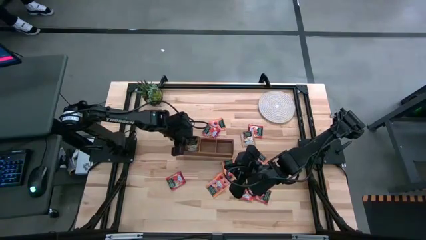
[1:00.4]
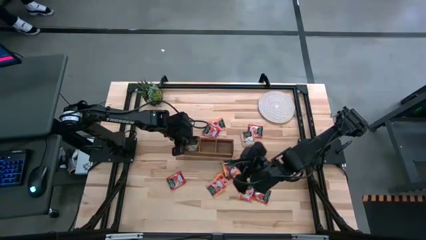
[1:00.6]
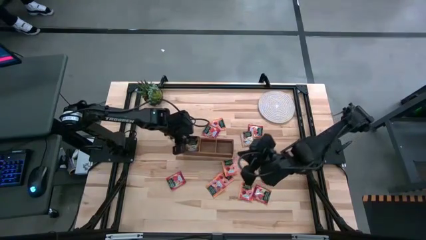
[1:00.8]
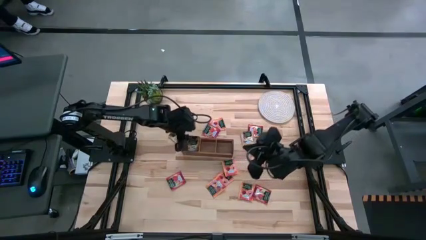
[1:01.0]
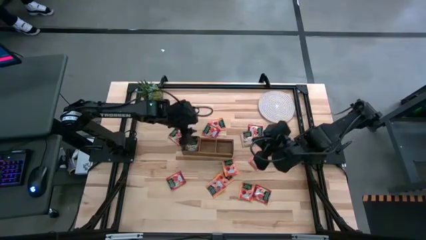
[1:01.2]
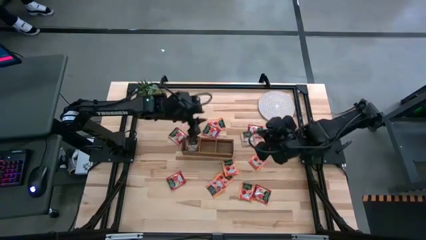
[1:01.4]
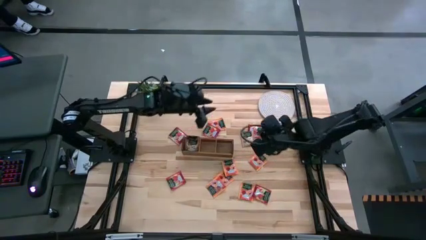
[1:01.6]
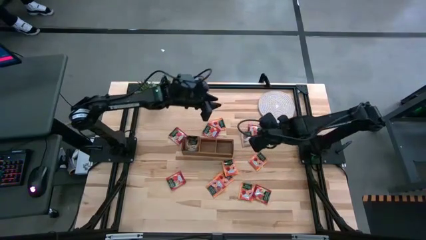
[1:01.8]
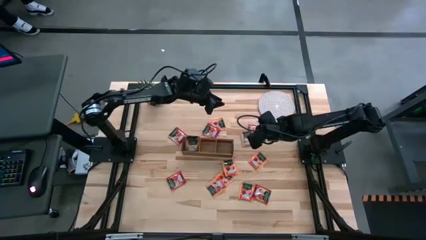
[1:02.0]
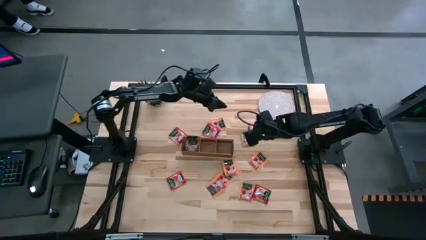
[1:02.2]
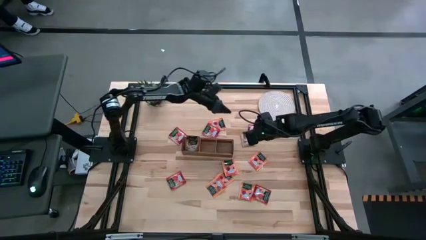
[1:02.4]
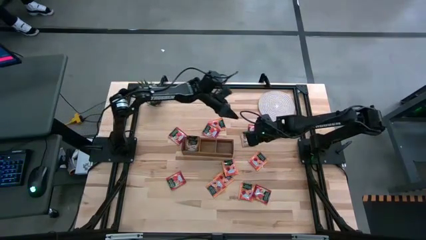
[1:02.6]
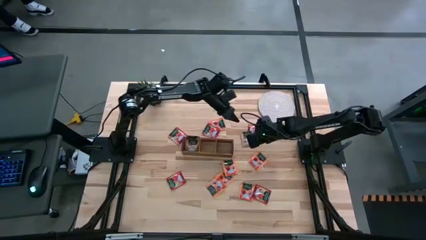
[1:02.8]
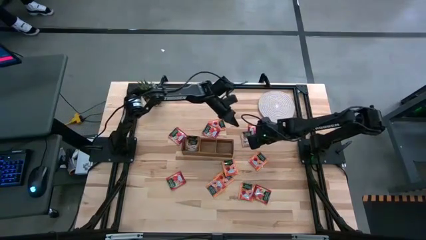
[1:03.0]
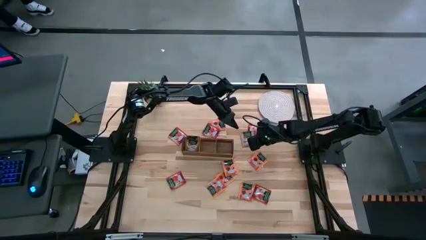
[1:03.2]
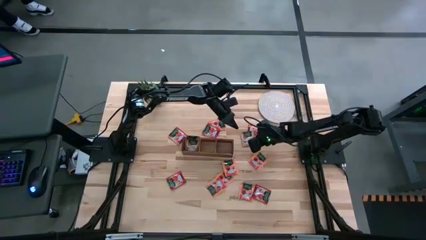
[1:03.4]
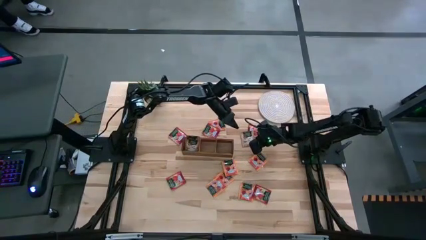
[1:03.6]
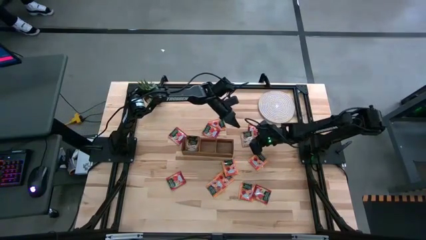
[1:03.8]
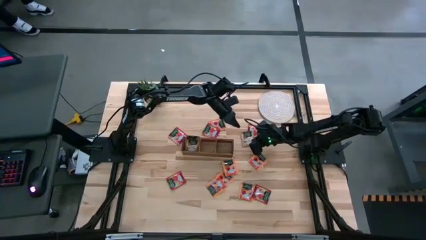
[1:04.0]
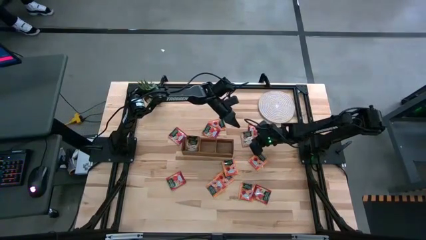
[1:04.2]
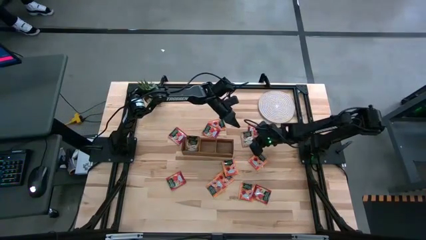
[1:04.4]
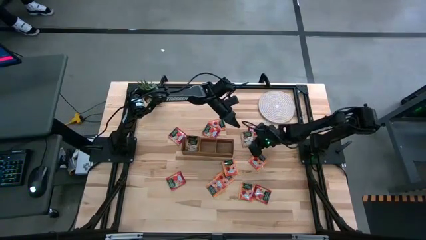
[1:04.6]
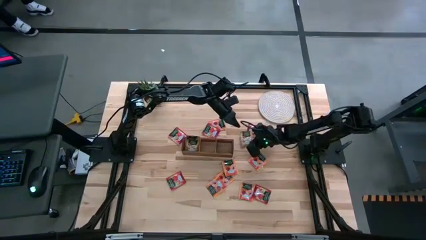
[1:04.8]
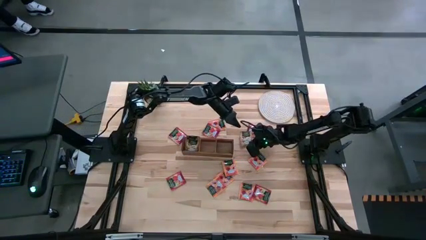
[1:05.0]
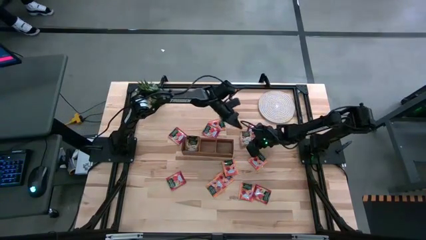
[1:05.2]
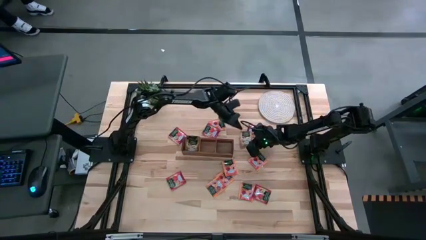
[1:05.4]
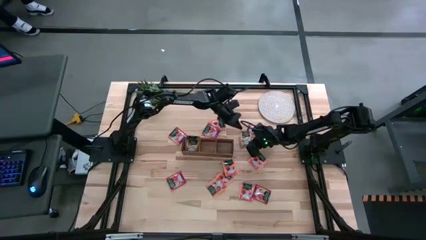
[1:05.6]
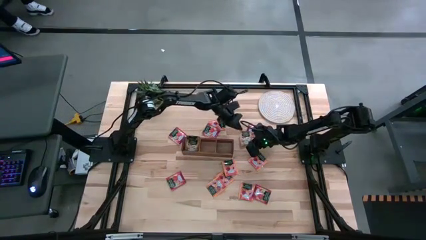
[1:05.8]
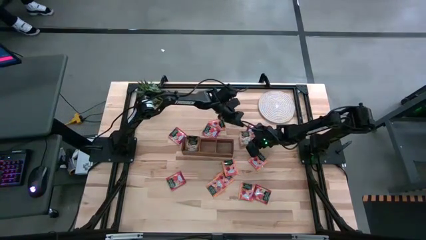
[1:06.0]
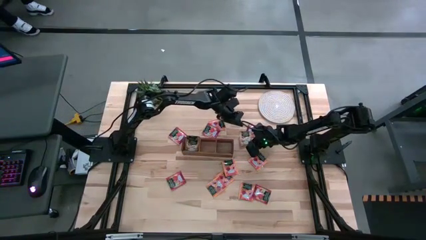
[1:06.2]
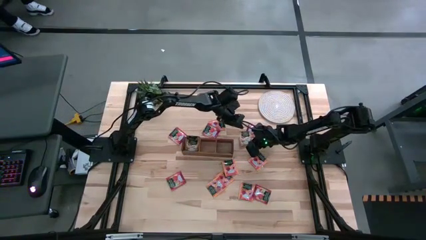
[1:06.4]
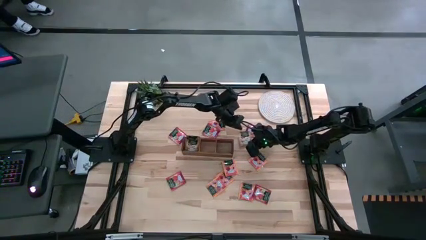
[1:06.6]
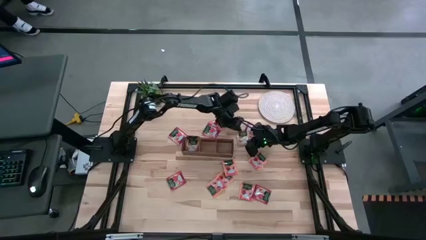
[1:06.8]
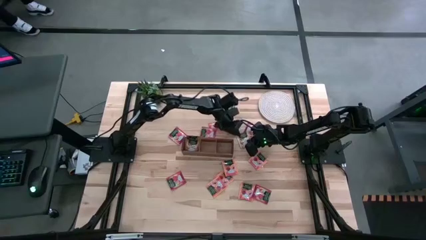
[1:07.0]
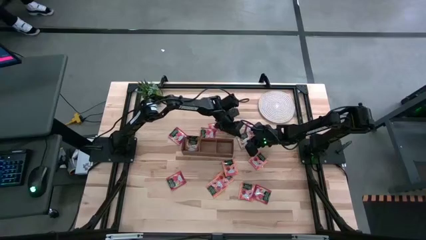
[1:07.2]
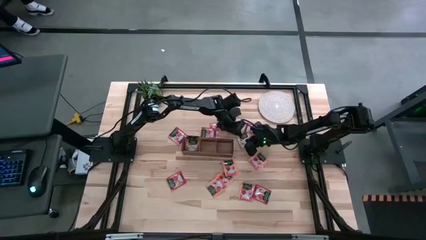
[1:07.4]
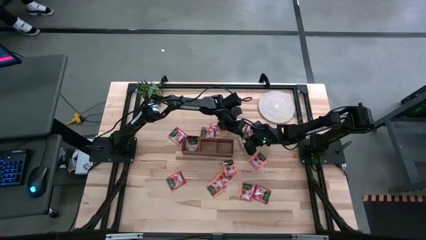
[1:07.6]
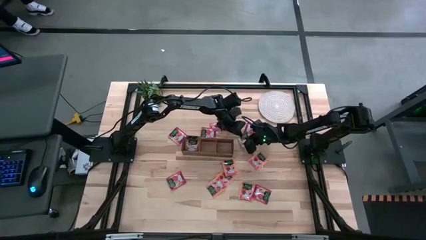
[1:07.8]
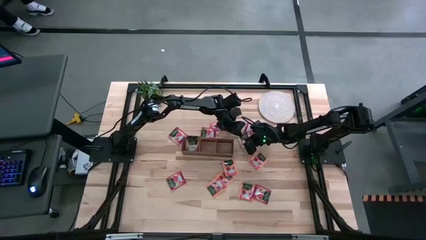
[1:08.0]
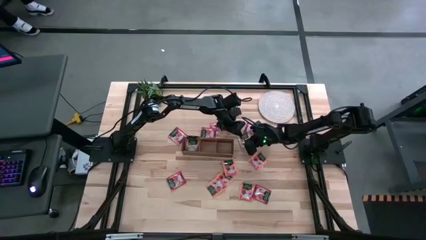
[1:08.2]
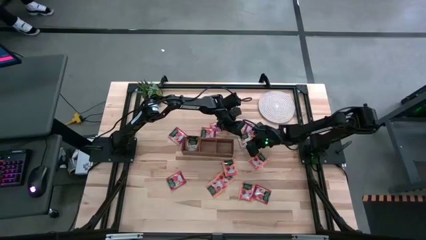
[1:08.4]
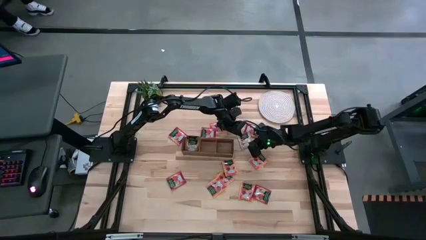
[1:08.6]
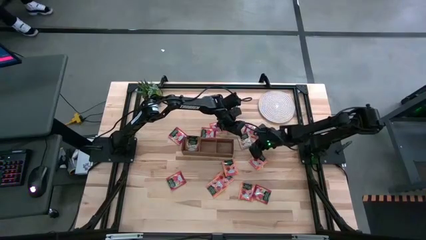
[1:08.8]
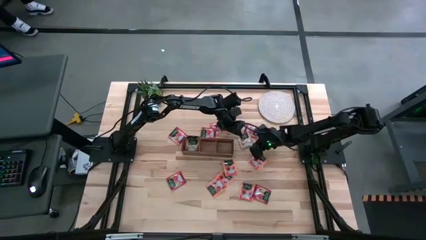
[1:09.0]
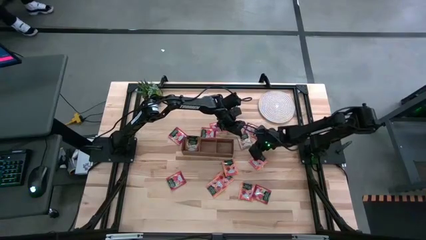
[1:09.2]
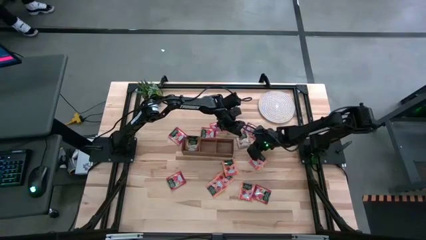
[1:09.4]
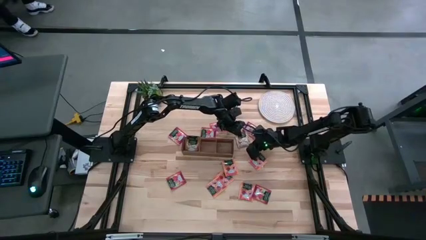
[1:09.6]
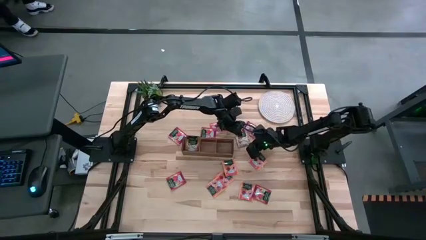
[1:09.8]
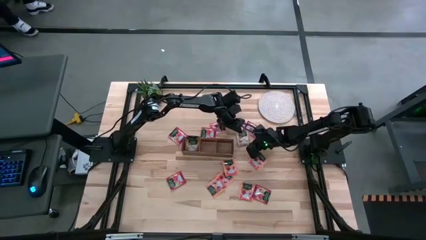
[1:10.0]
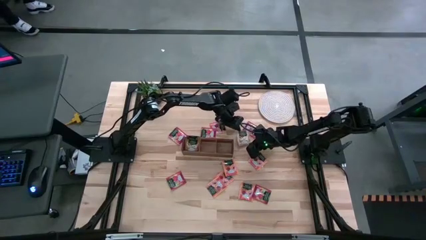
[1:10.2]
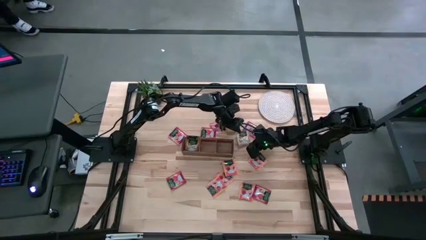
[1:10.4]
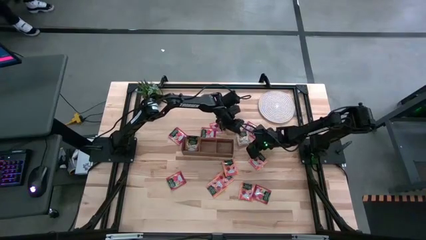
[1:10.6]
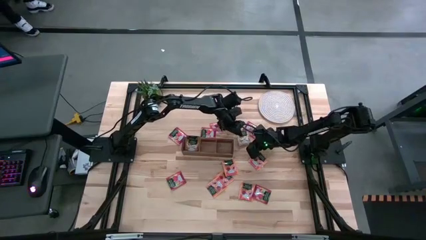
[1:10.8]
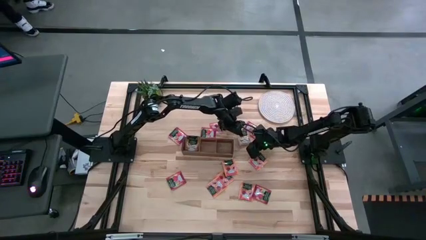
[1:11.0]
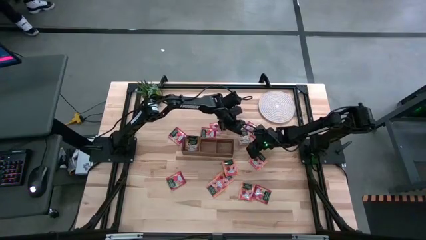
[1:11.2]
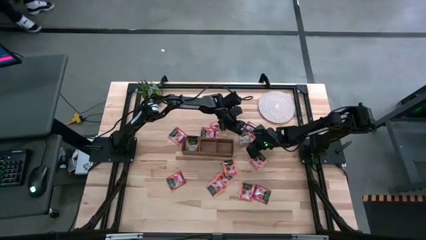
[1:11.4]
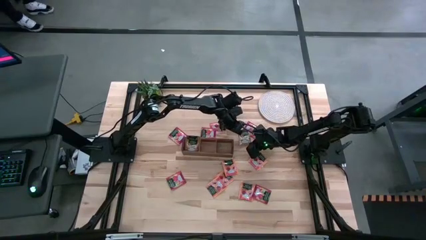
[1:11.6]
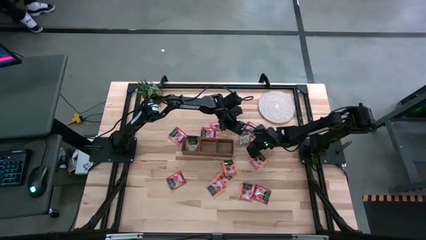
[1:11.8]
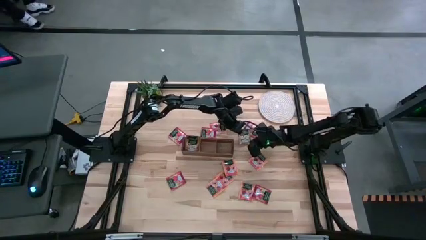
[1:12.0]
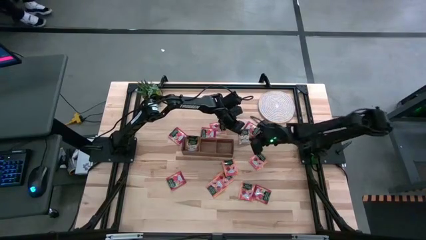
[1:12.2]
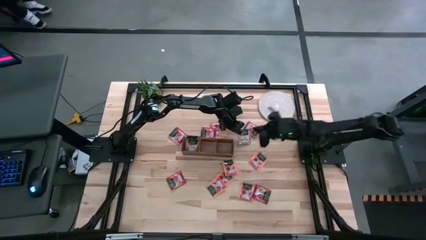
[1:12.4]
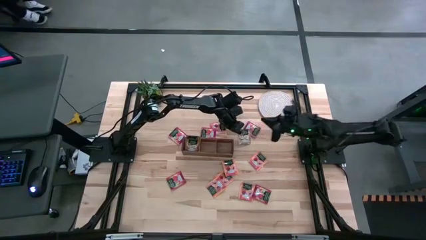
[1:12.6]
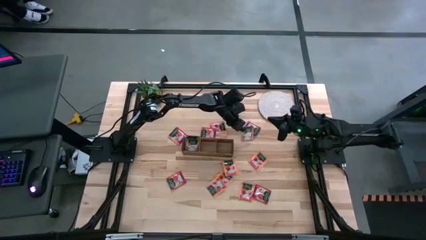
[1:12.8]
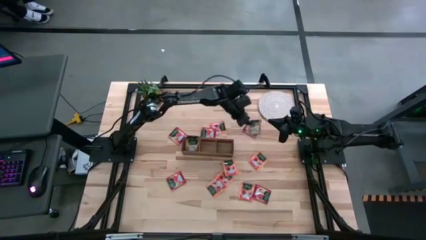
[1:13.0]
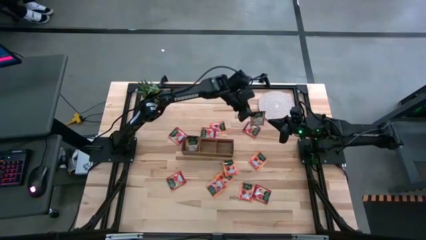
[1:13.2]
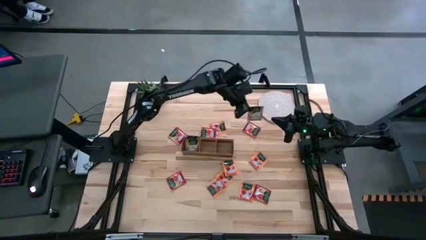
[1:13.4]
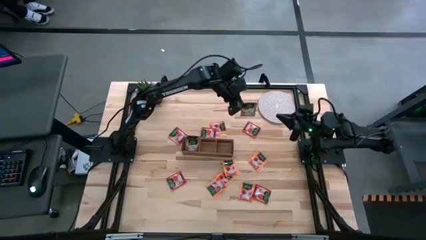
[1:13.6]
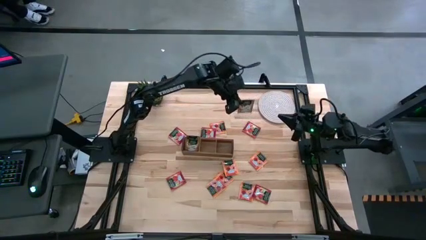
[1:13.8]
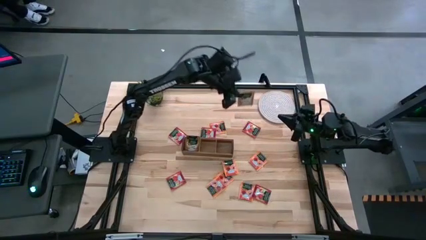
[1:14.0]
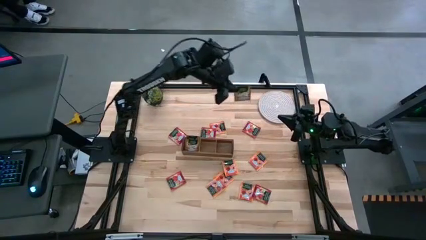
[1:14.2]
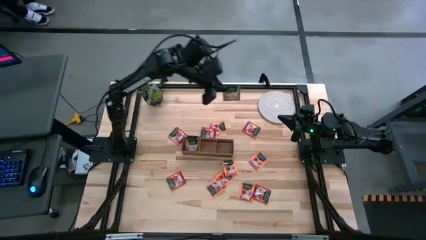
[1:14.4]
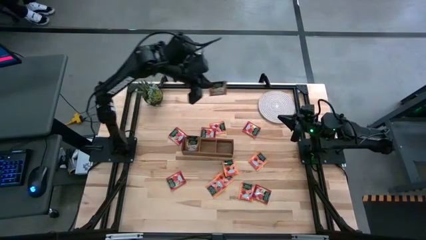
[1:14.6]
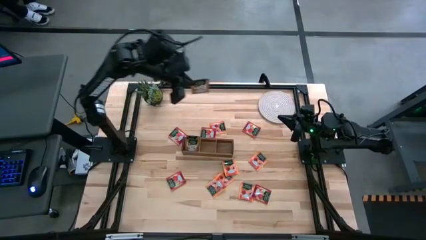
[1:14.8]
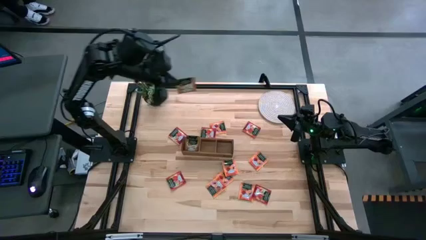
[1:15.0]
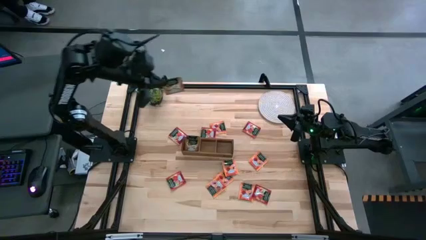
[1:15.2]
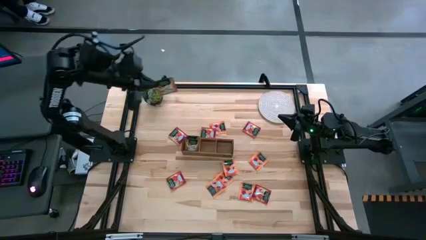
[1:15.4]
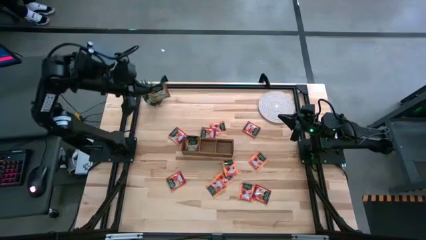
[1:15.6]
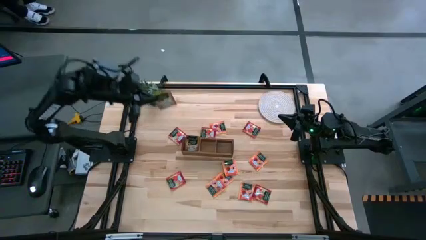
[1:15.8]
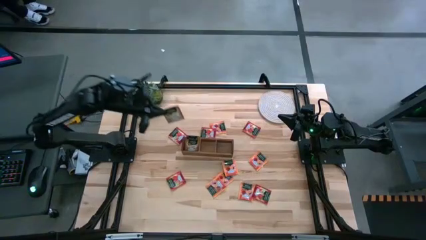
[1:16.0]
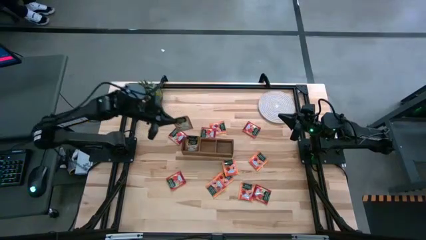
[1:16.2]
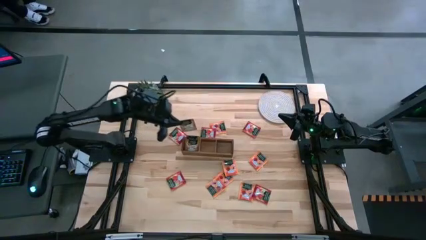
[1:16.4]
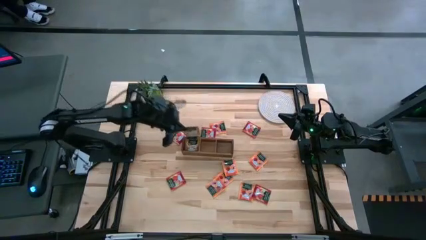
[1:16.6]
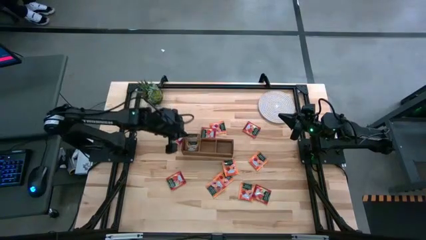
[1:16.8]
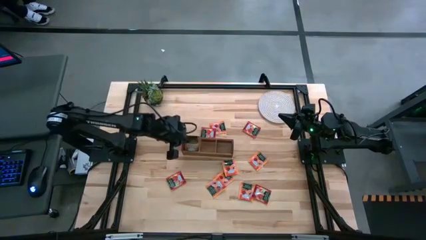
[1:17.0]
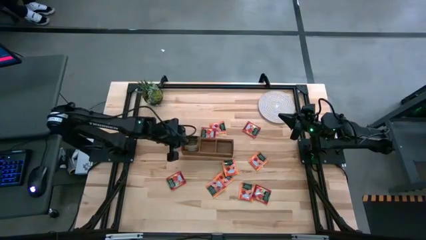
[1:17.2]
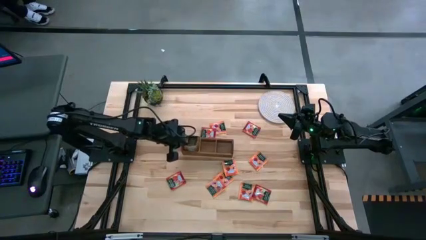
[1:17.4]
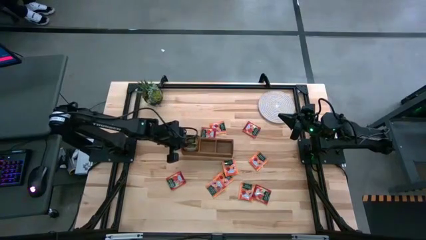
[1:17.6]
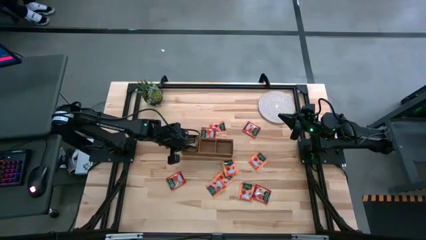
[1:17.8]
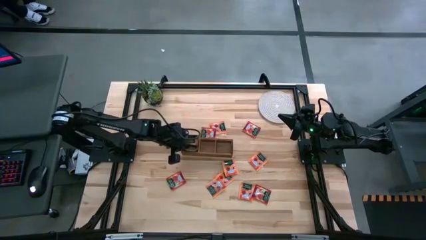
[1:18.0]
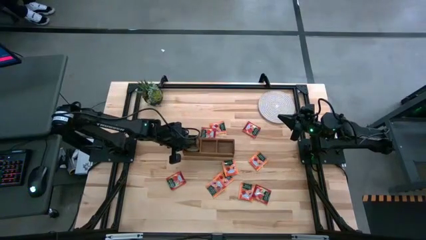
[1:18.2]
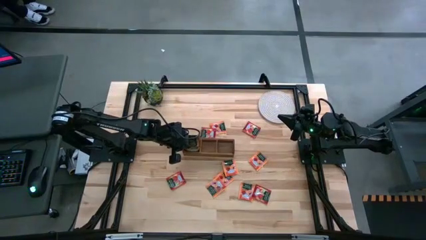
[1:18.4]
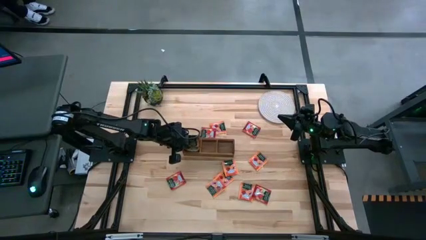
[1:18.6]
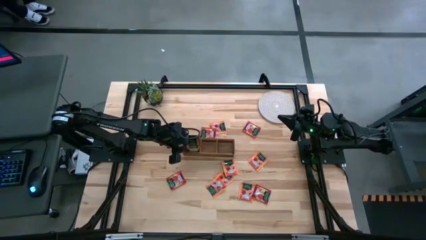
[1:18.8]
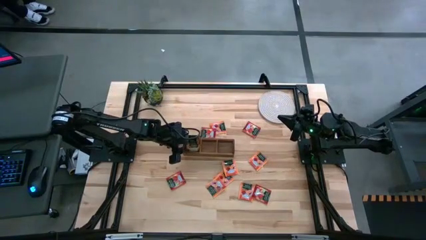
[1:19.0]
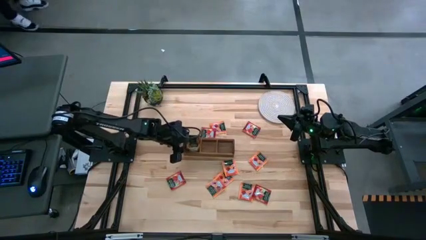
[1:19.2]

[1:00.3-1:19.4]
Task: Pick & Place Tea
Put the brown tea bag into the left section of the brown wooden organizer
